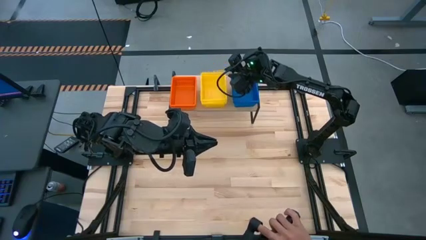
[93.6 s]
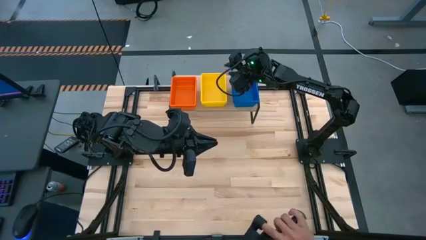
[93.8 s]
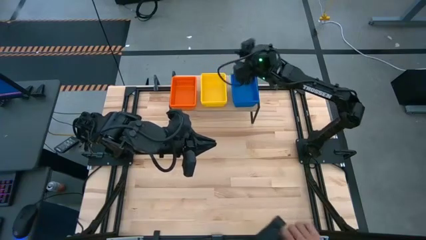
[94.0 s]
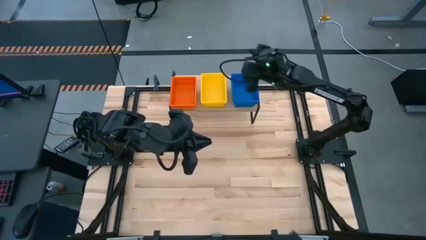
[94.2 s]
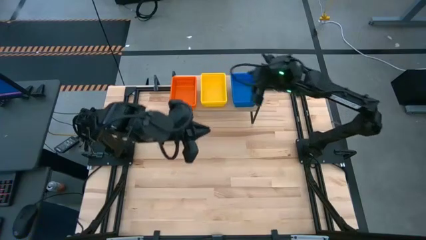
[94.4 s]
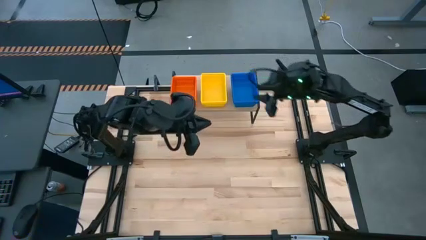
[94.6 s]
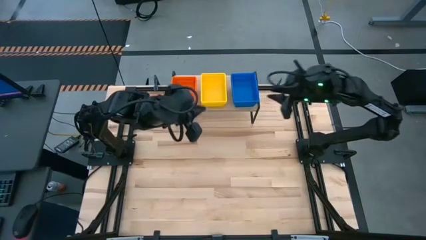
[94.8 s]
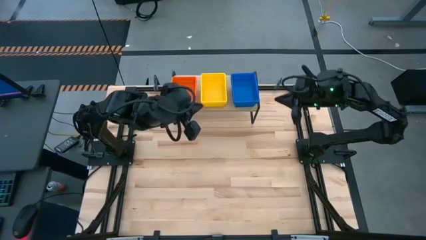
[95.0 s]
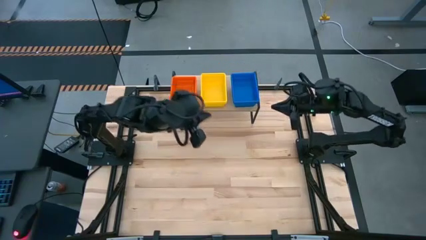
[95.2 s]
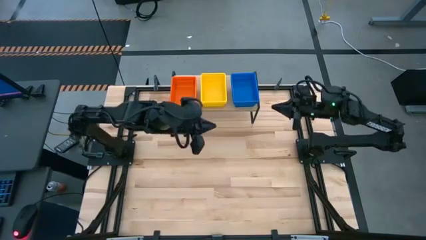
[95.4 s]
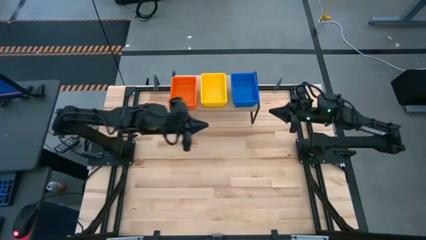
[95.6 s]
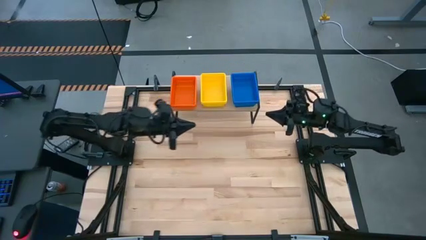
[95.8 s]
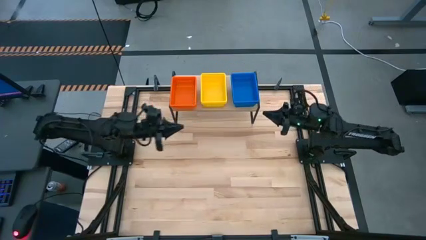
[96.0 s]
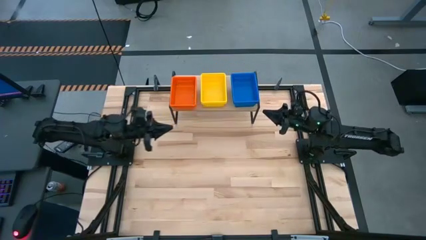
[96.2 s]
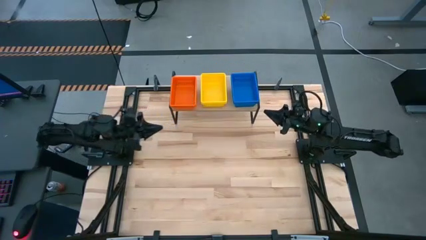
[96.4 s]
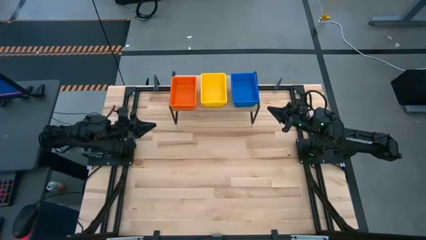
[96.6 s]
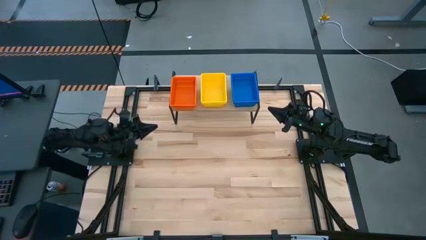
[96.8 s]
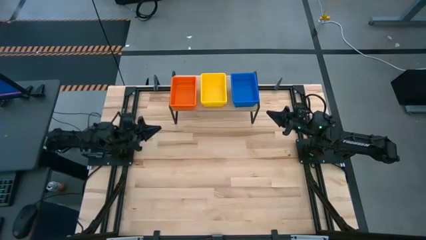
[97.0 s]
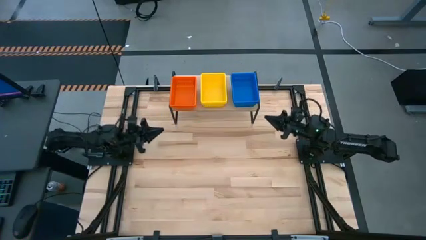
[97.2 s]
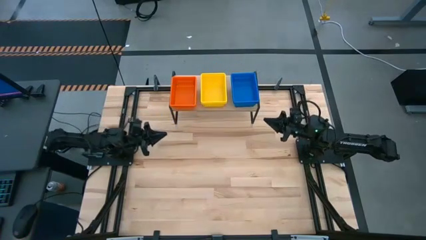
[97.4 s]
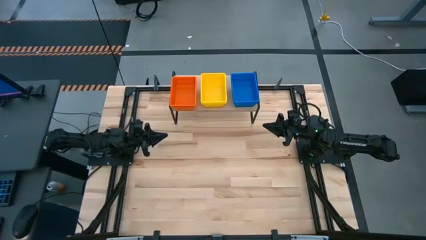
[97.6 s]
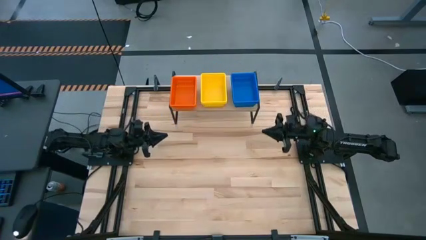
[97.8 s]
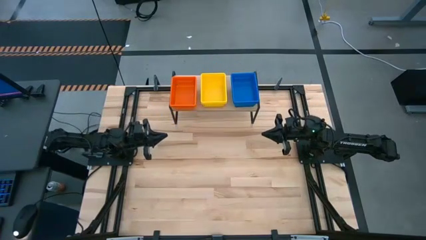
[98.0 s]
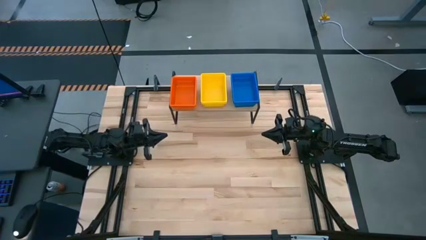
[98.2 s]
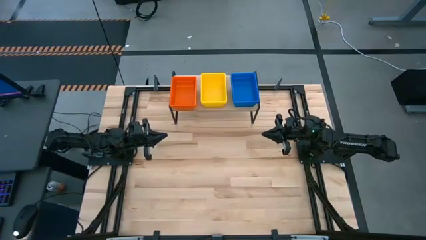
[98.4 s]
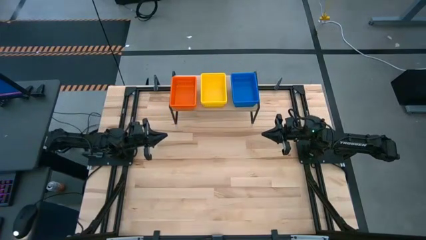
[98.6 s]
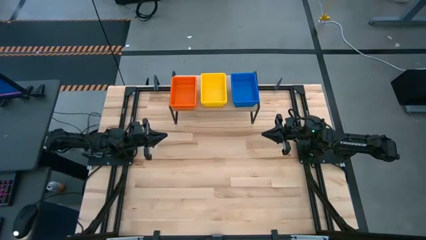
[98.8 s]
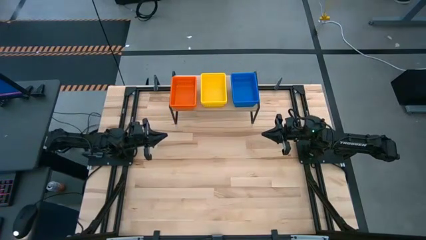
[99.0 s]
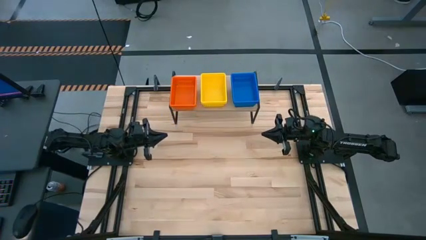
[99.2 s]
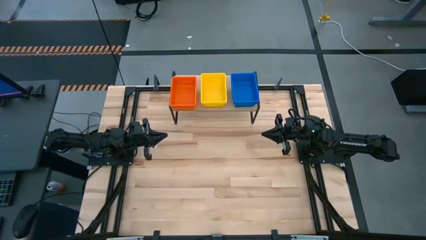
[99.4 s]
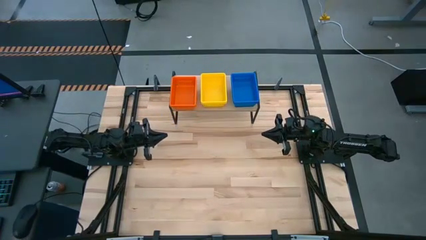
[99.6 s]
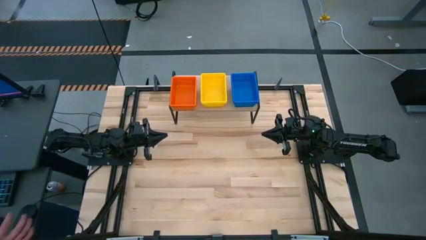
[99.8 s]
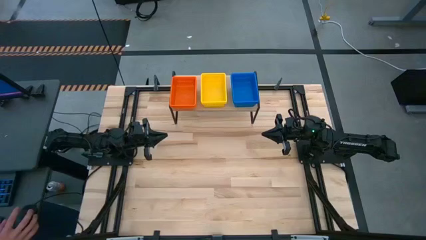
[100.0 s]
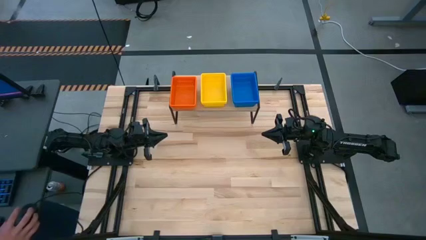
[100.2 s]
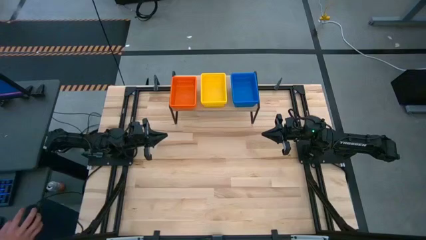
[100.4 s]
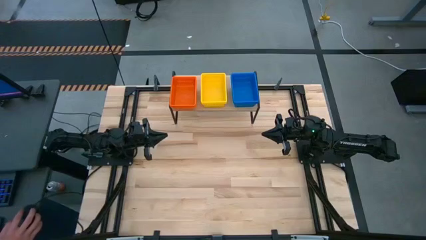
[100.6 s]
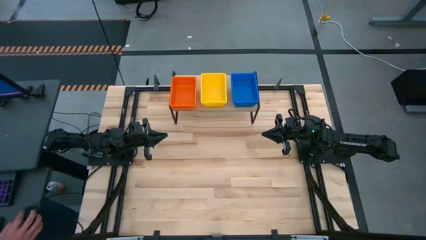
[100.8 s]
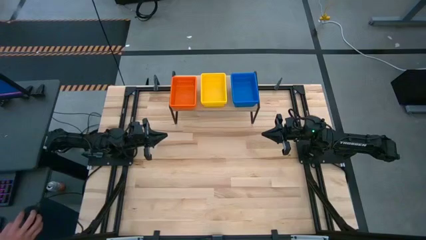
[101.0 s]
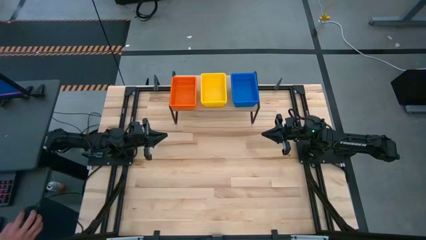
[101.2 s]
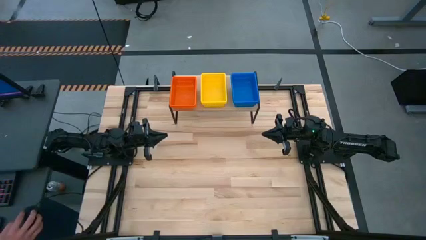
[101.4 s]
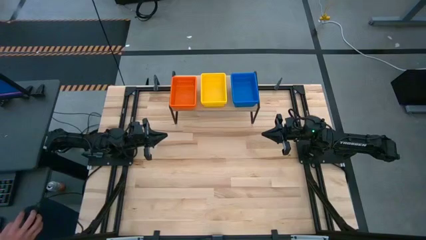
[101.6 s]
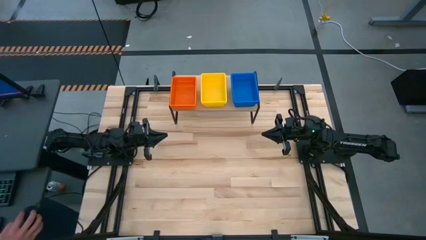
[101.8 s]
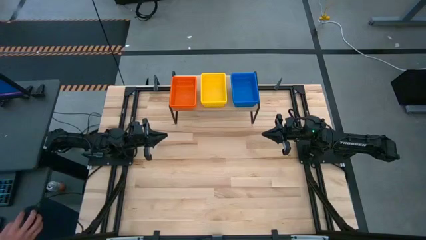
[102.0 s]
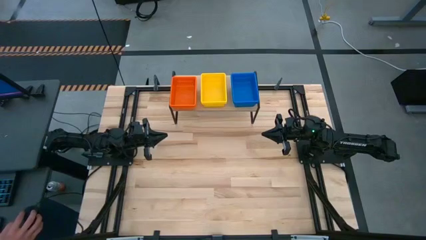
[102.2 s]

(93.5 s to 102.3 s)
Task: Stack baskets on shelf by color
Return to Home Position

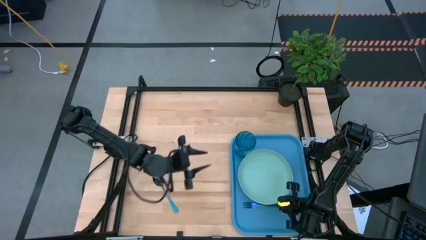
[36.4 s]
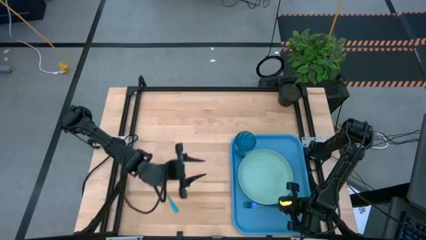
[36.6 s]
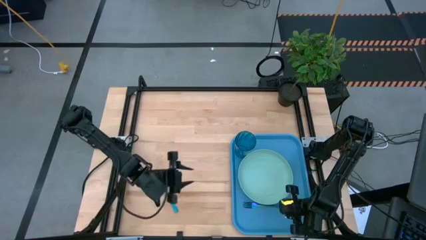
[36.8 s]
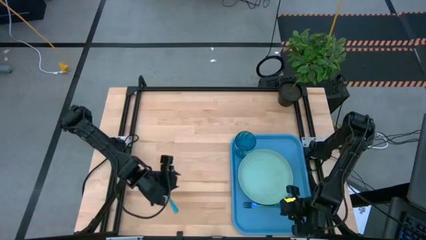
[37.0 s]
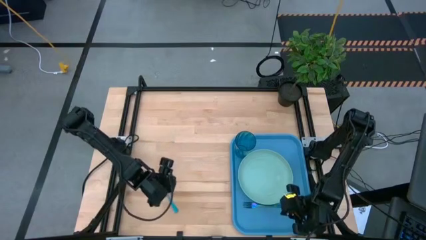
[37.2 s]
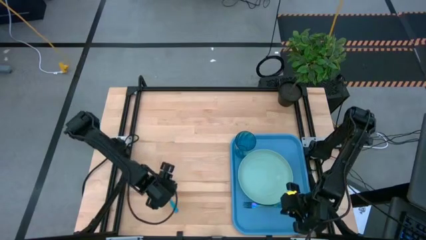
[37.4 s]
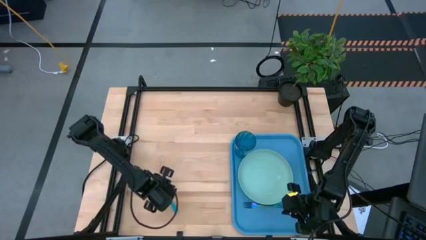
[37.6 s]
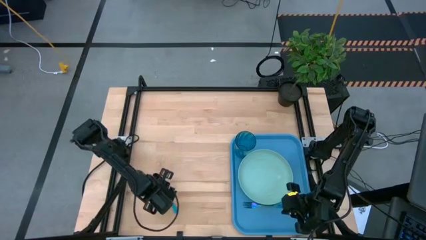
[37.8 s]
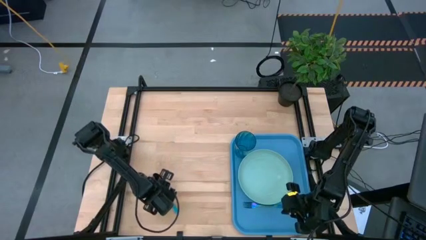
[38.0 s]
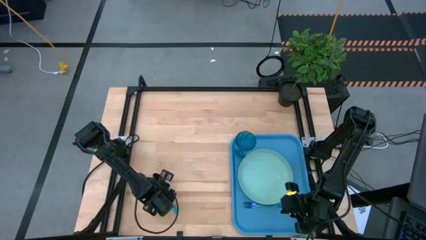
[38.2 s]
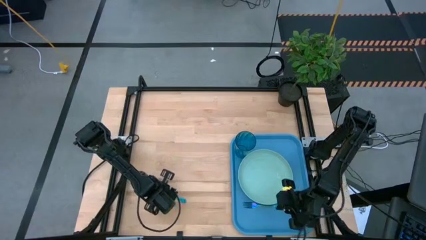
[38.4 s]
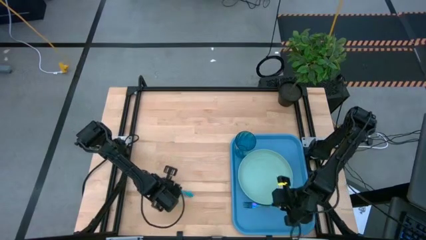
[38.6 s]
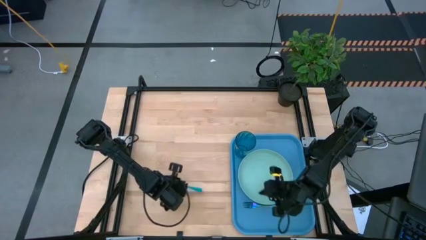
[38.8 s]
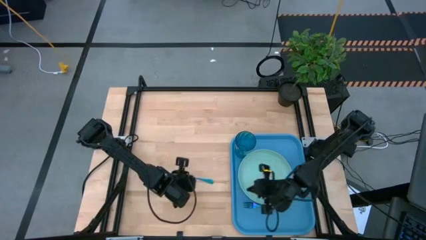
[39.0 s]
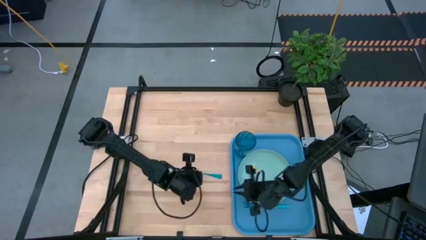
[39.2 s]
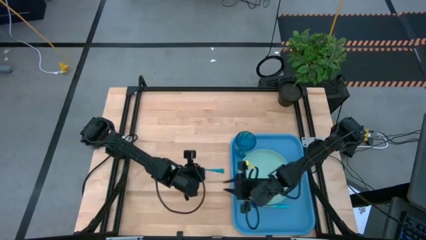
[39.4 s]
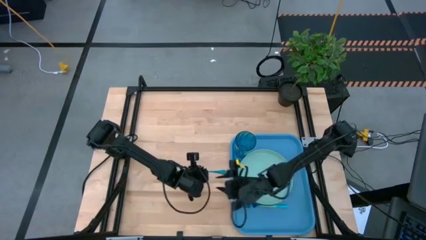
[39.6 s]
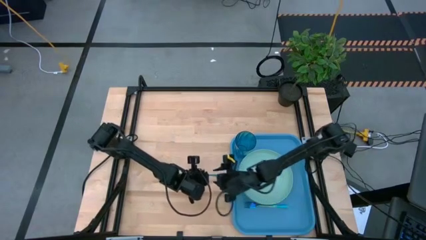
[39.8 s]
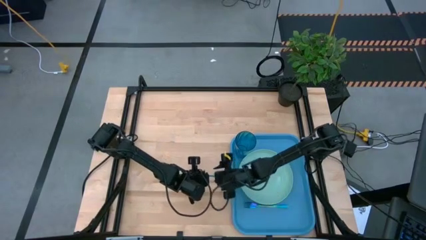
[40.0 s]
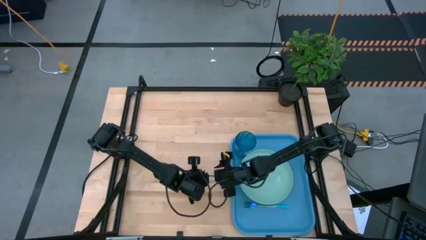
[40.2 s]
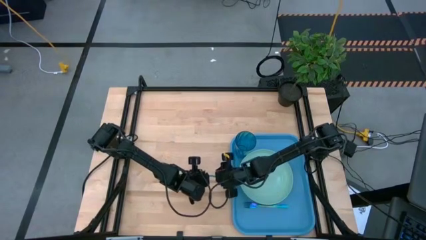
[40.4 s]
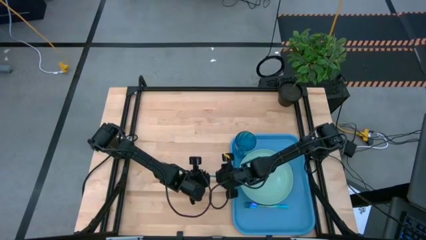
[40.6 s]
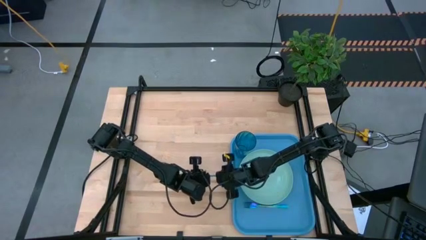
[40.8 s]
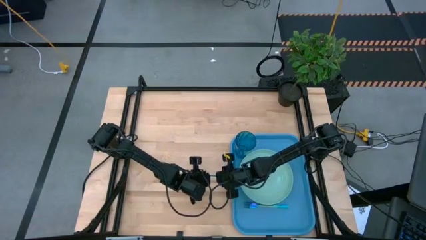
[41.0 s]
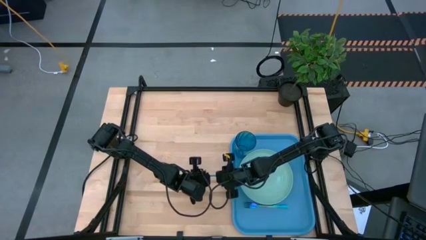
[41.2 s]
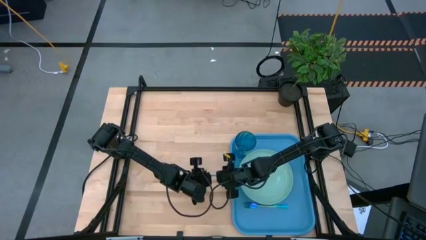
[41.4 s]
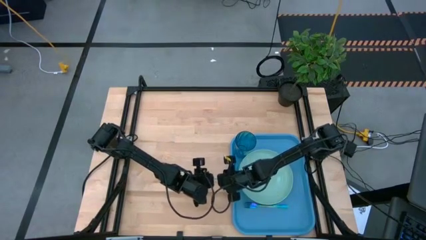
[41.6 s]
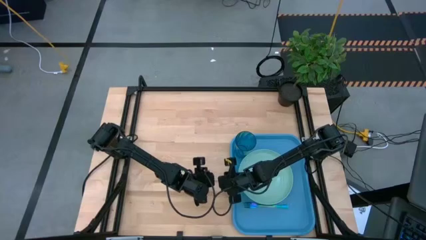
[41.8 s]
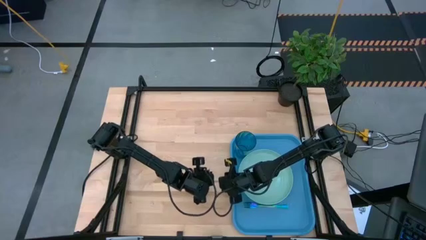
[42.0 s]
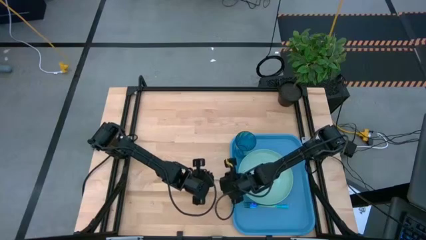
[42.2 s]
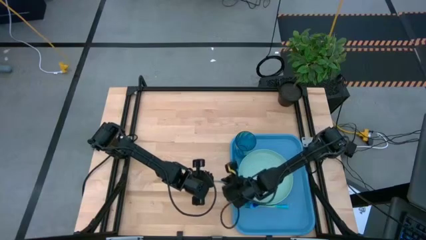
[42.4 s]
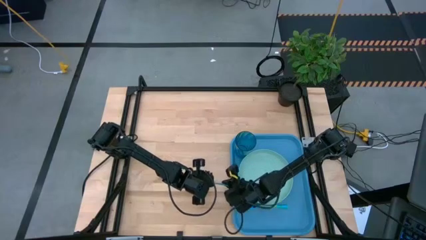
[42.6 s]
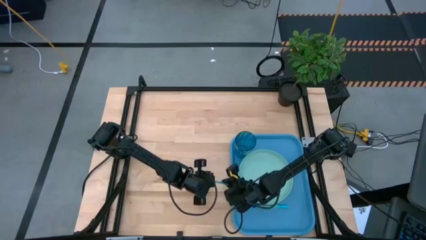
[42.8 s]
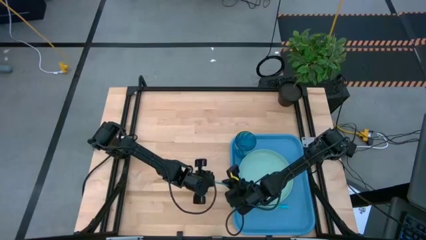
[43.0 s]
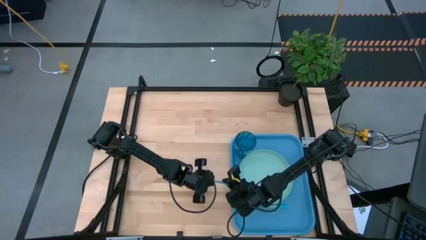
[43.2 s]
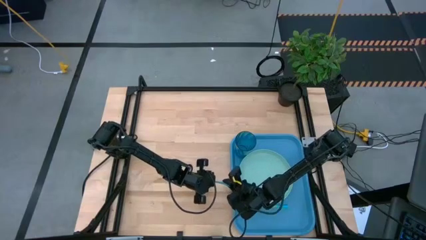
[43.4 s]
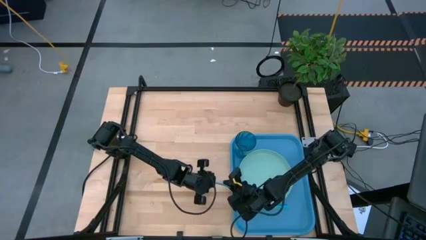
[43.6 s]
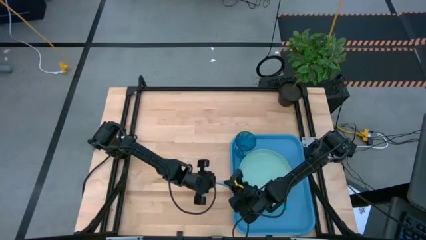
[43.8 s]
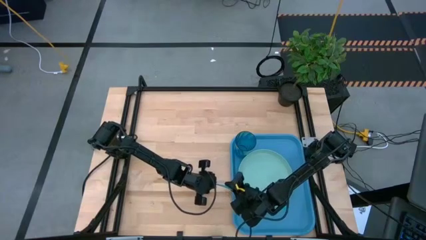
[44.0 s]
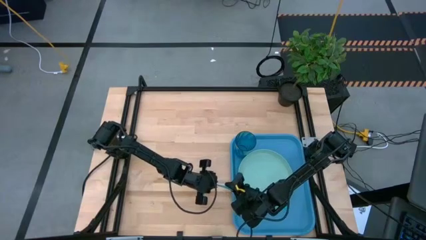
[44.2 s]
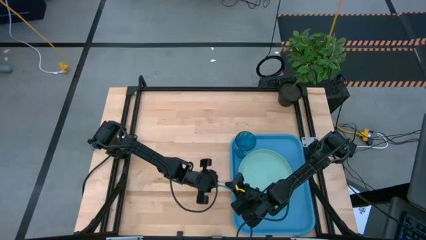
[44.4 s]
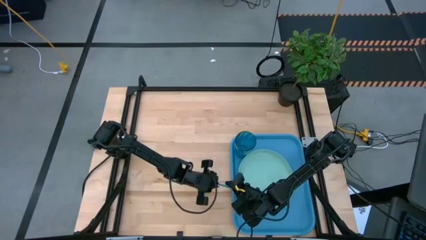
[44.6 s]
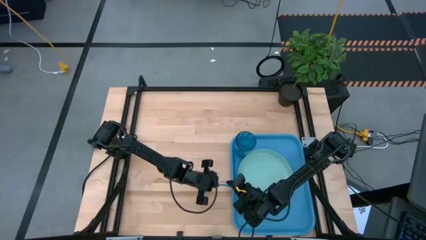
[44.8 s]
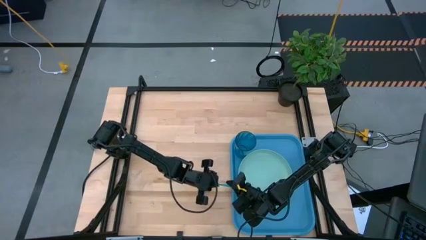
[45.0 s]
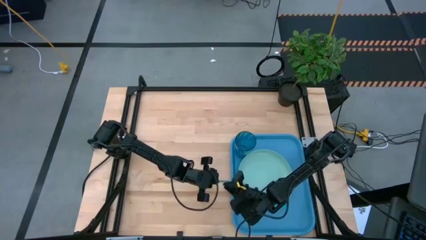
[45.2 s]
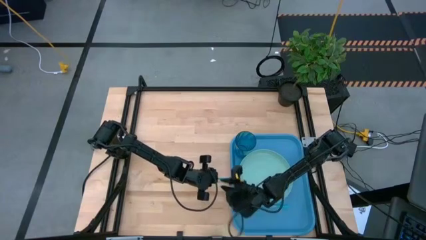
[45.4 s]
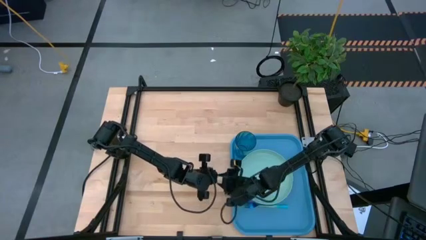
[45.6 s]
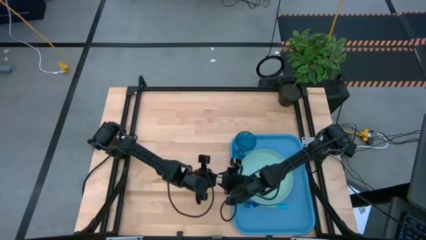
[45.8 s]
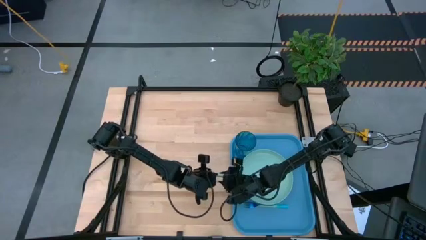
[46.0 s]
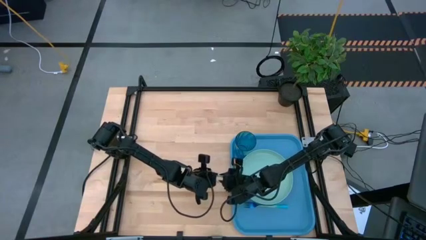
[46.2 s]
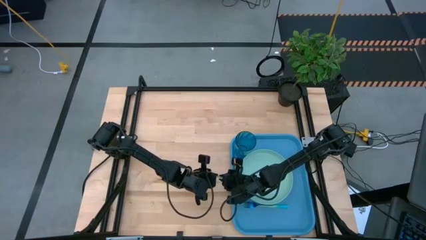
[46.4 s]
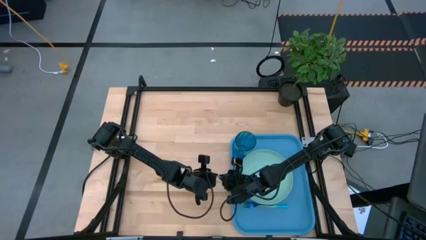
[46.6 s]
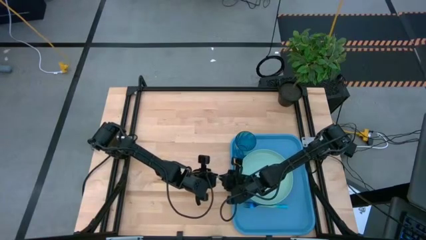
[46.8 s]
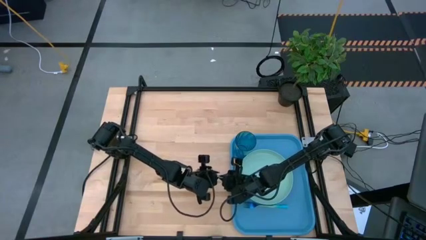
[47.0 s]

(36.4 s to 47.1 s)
Task: Pick and place plate/cup/fork/spoon on tray
Put the blue spoon on the blue serving tray to the left of the blue fork
